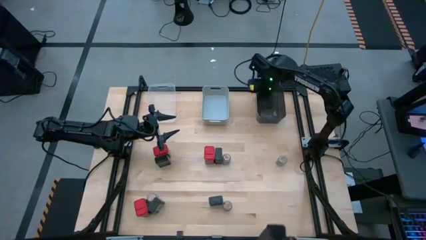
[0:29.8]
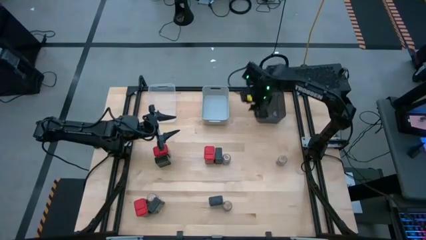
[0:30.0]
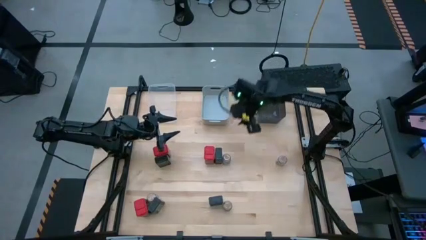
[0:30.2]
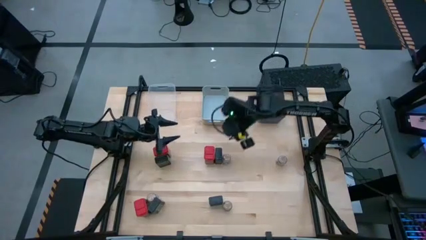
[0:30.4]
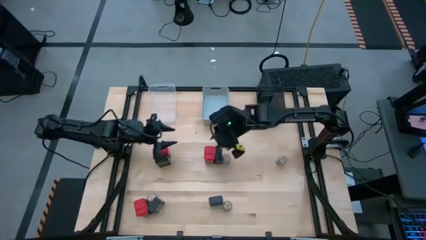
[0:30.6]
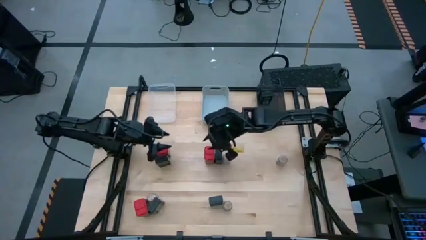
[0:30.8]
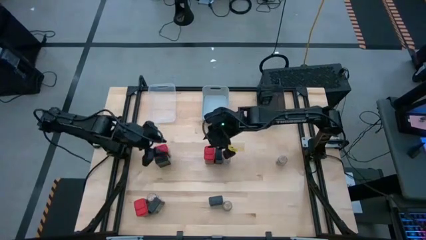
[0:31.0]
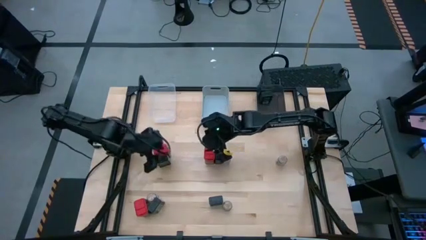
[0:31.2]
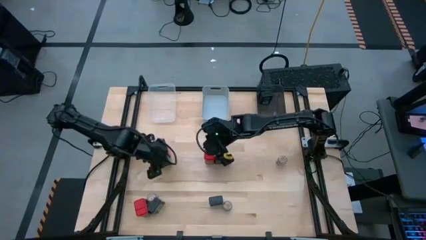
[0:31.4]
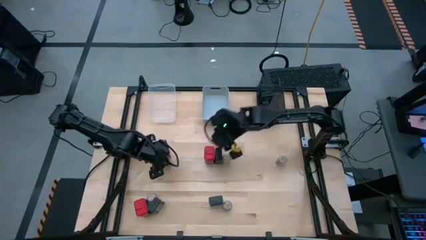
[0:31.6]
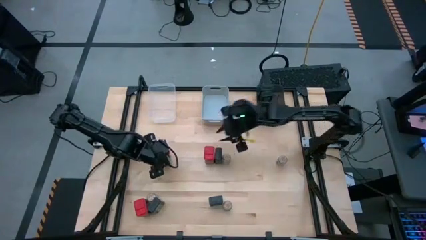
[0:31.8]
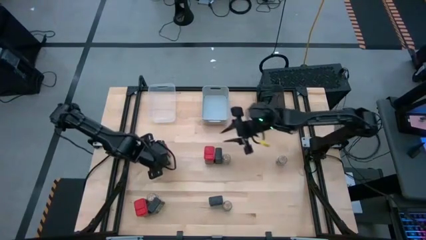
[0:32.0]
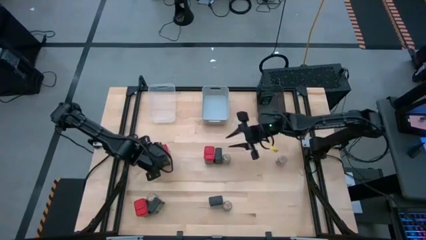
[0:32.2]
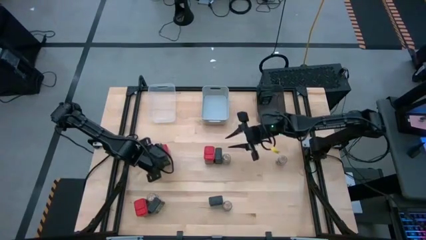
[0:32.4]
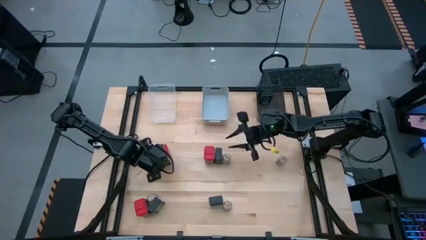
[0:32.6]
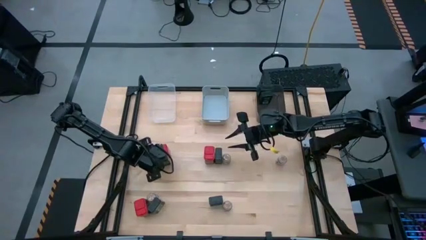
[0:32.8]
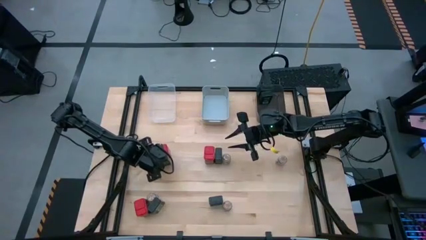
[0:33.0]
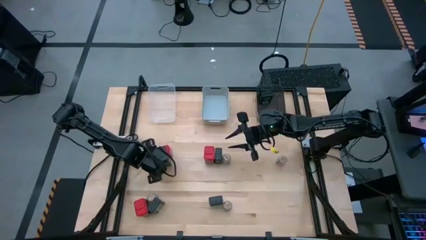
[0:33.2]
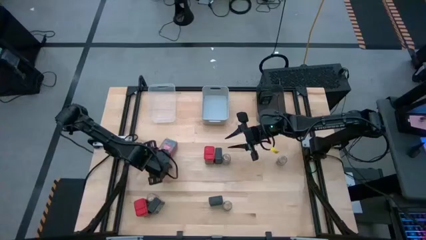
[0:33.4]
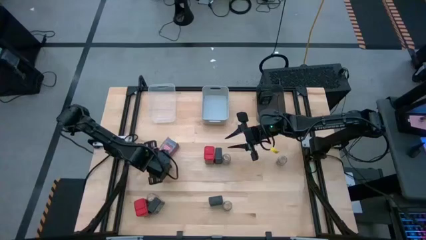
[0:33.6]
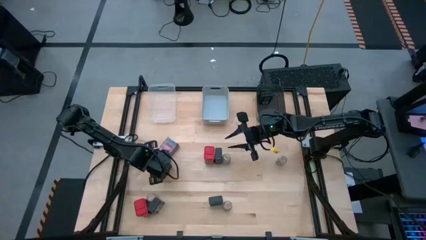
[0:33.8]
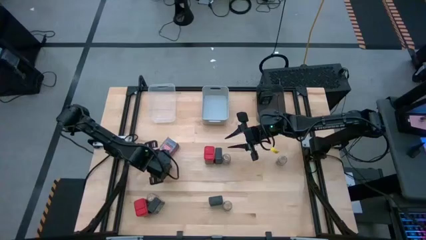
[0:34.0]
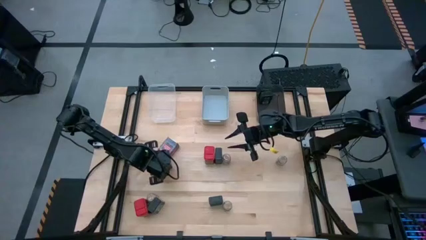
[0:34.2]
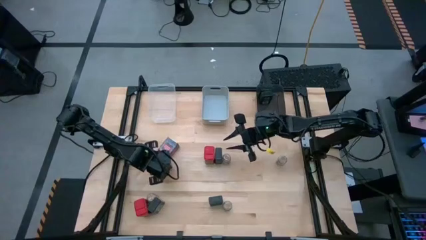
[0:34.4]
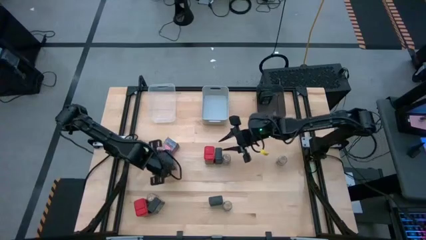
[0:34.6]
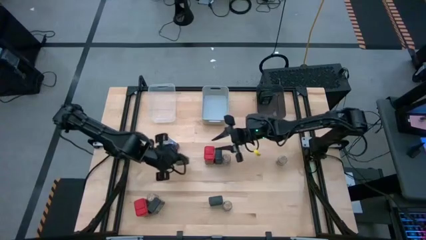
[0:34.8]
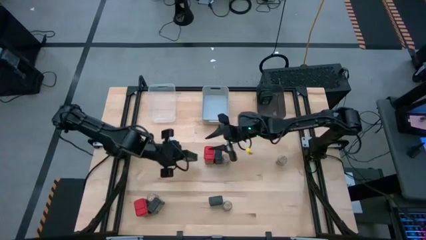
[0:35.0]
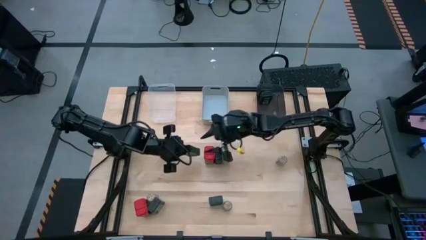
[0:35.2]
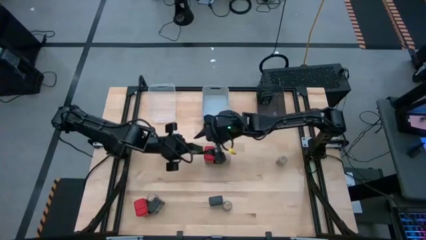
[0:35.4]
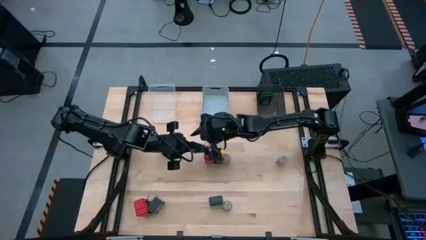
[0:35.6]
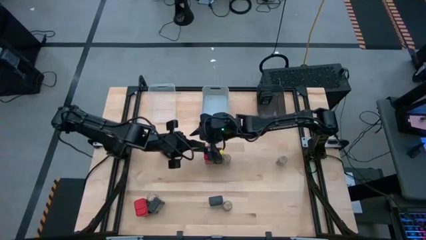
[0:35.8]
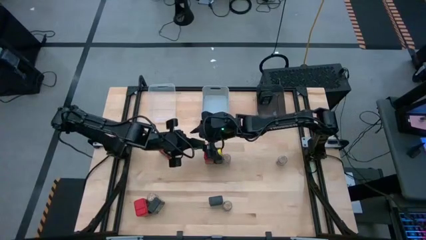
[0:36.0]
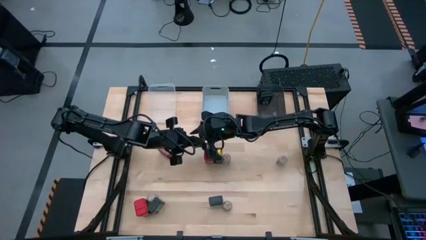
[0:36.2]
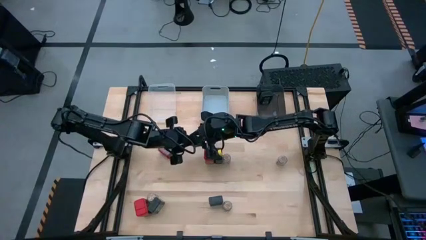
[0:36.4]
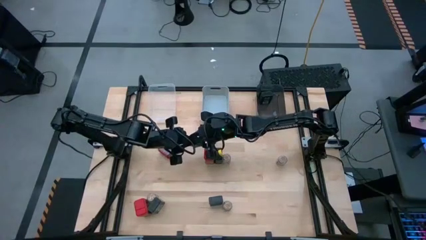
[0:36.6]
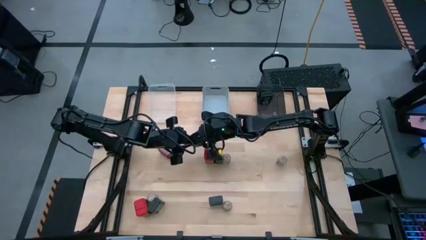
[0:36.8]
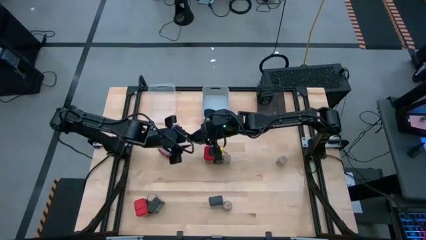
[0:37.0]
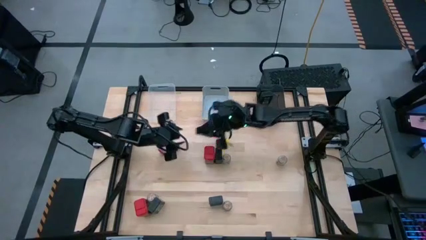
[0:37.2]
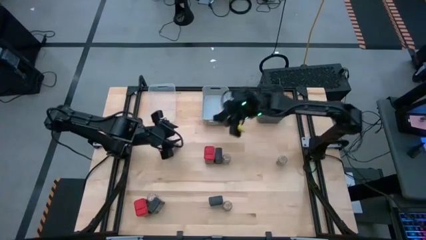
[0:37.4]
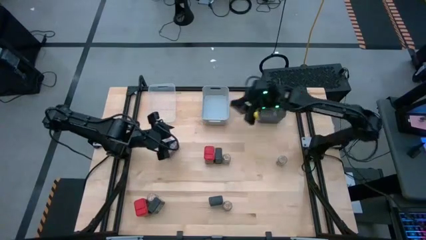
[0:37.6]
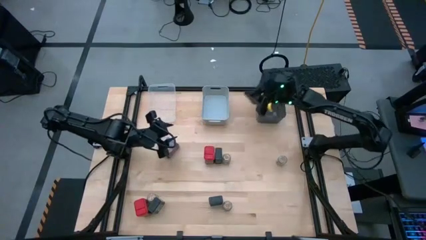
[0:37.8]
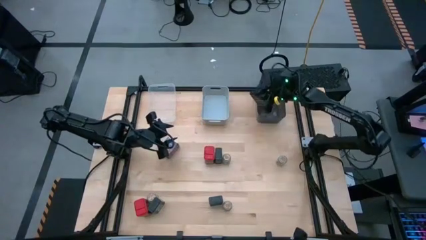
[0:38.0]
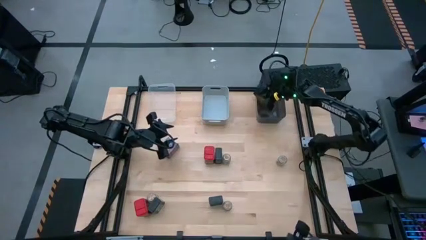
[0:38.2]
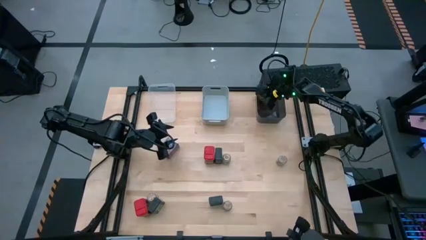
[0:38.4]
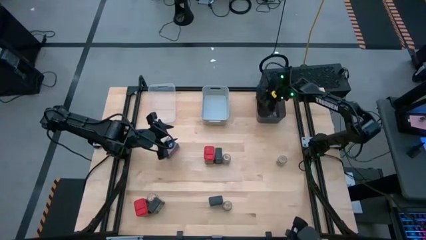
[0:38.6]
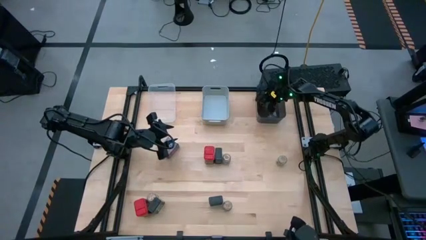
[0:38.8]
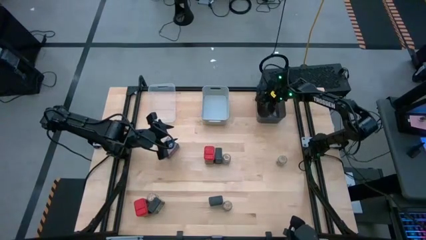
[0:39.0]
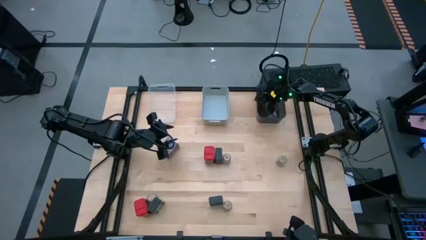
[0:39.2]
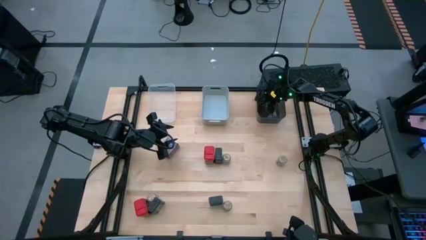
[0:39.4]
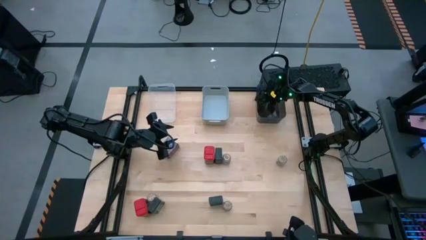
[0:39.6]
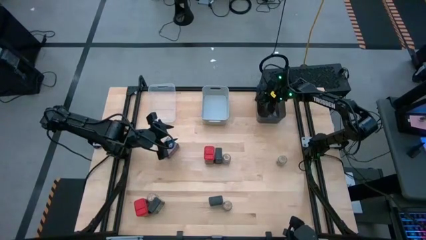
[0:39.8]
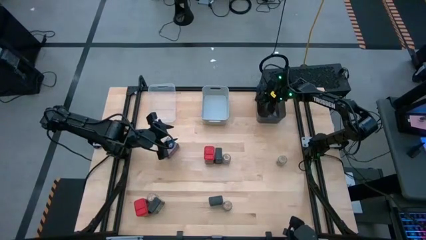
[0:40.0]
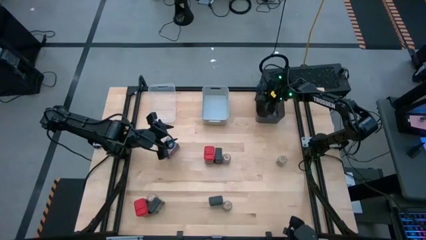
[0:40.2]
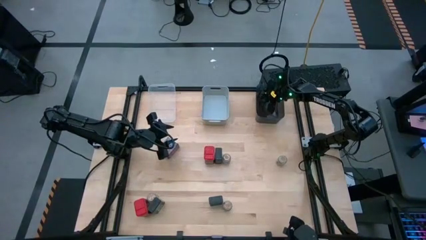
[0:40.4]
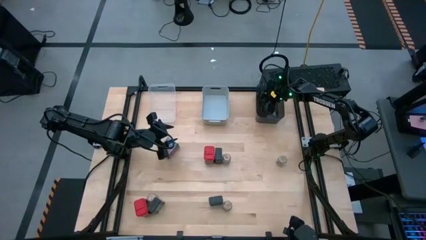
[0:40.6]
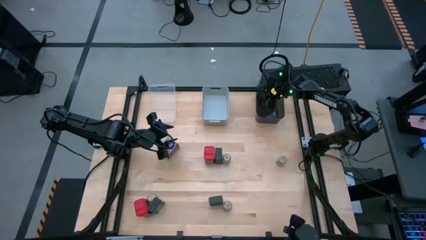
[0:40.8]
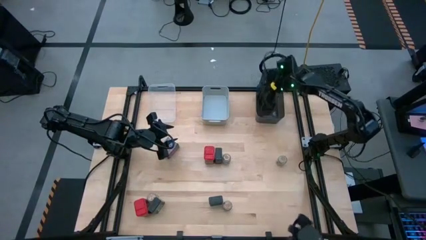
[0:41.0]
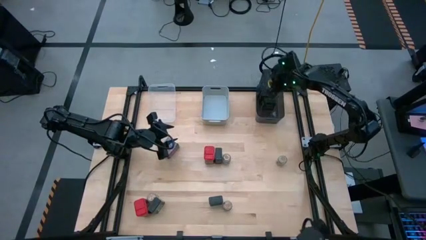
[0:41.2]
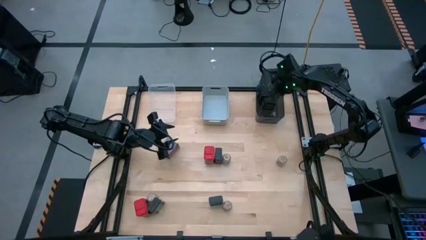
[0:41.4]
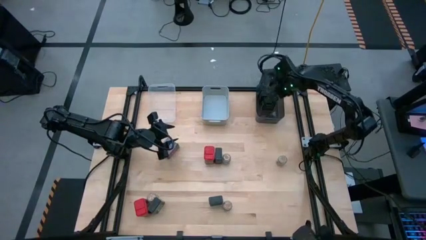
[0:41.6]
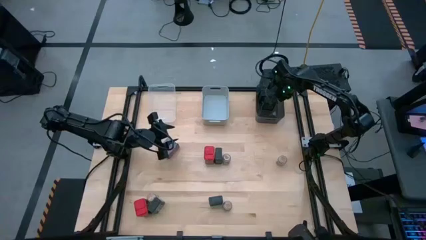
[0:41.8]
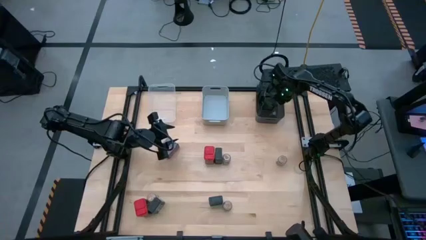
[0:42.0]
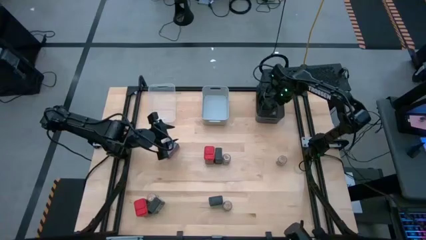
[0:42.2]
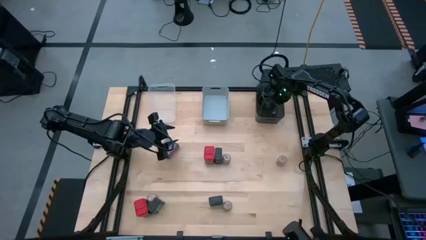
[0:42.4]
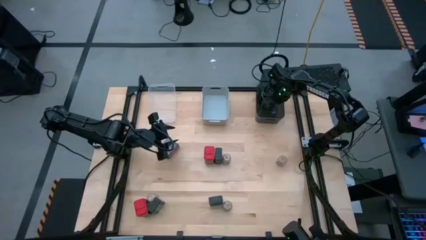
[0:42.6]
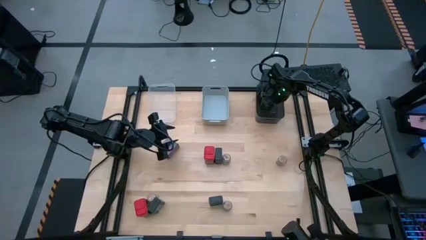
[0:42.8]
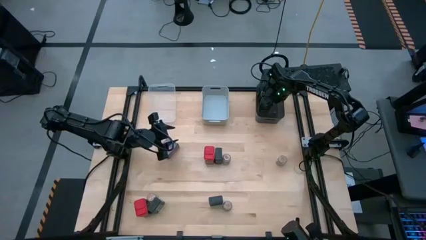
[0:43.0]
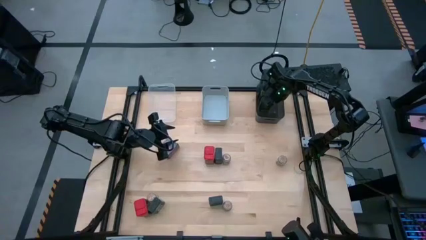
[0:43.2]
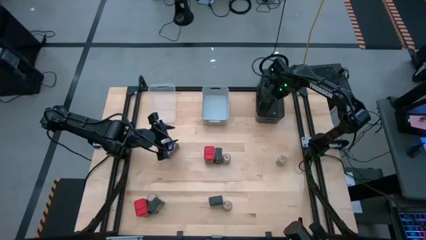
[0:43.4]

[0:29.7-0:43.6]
Task: Sort spices by type
Put the green seasoning can into the black bin

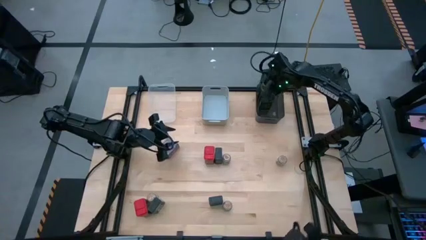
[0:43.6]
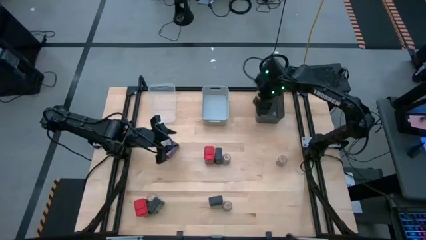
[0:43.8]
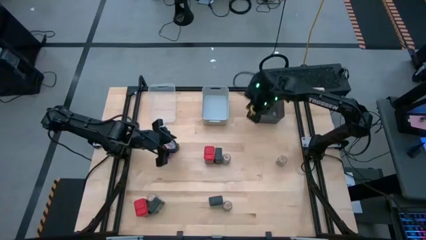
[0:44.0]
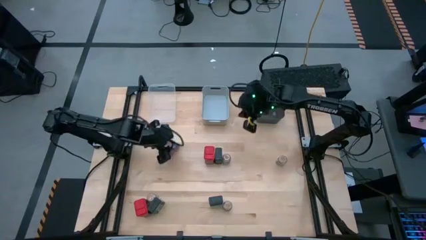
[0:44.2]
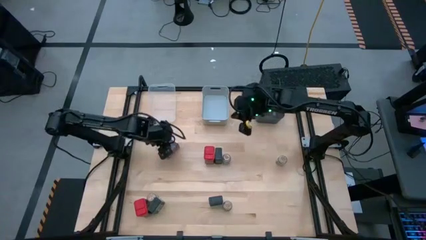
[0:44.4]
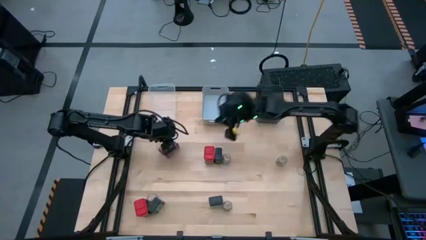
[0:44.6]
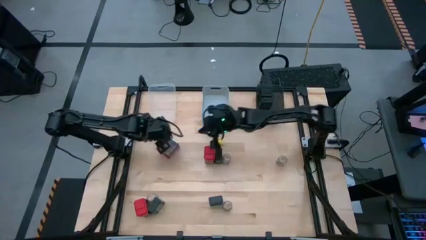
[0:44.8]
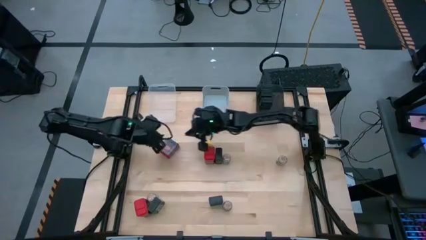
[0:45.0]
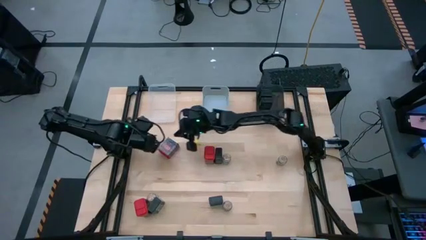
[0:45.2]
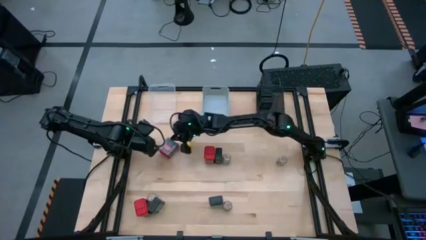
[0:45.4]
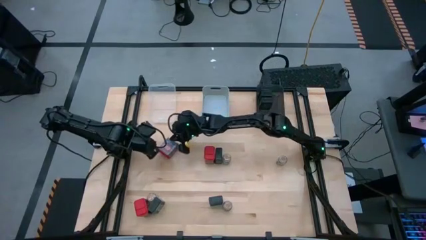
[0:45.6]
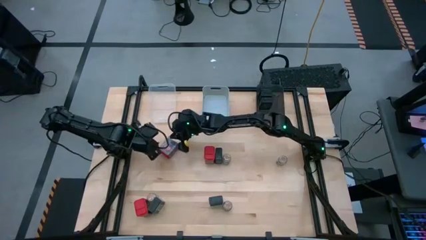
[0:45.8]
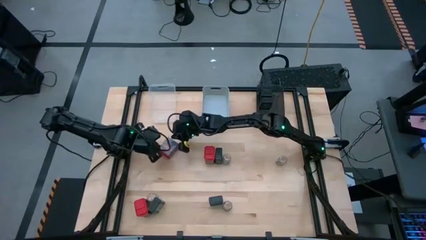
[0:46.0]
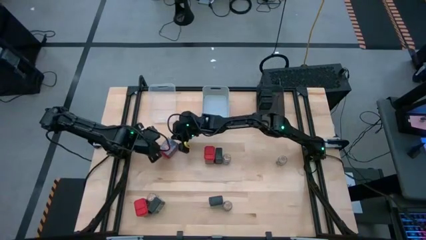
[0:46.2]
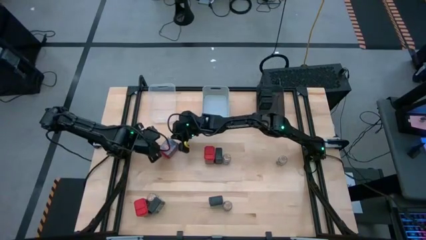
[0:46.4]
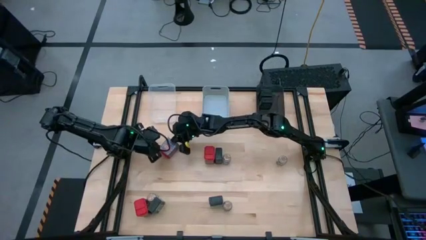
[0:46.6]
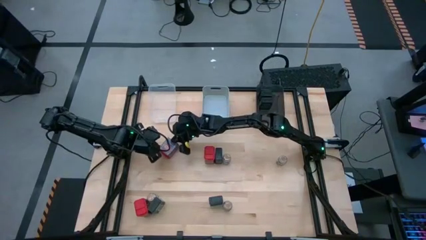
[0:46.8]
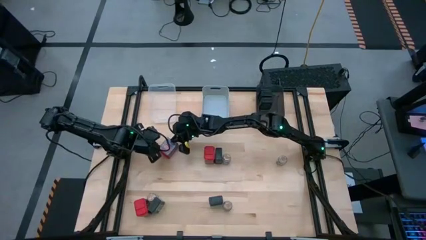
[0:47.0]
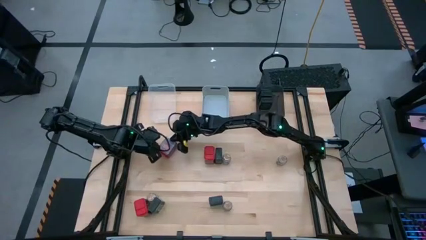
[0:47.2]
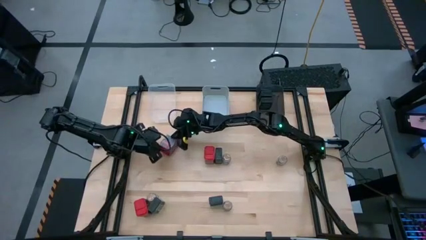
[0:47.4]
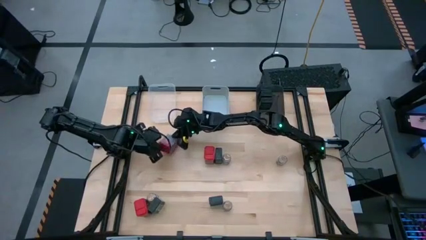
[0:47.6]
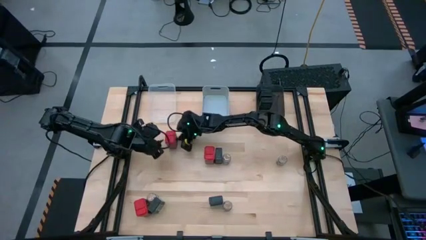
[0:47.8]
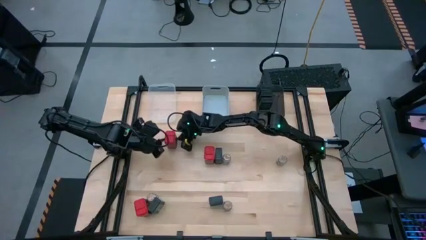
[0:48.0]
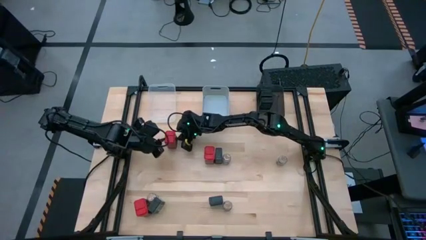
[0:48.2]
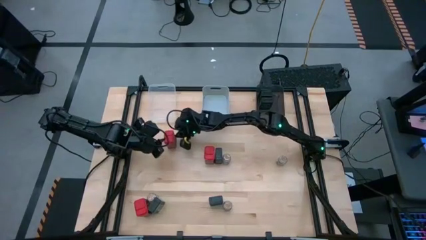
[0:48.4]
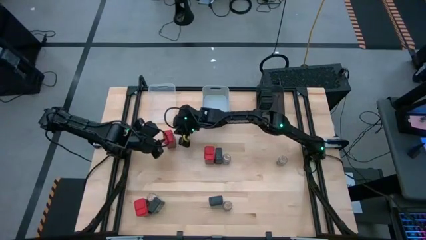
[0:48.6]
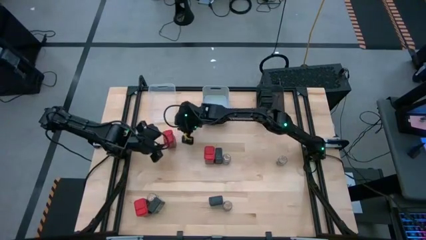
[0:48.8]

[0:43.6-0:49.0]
Adjust the top left red seasoning can
